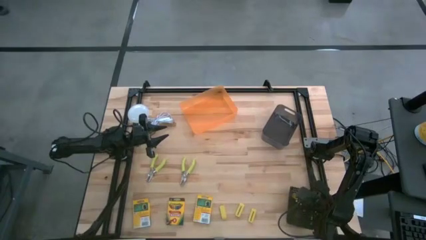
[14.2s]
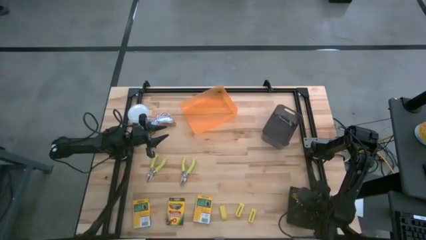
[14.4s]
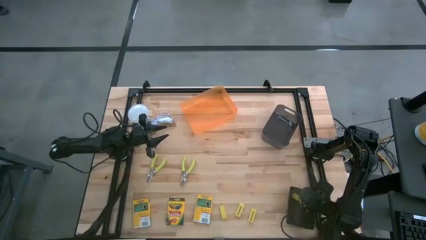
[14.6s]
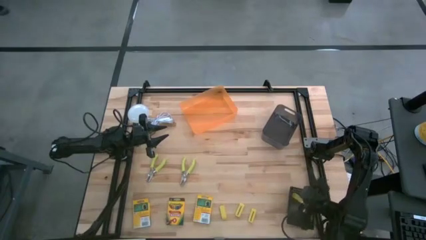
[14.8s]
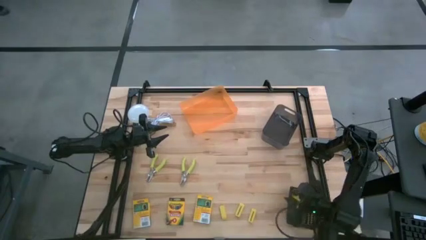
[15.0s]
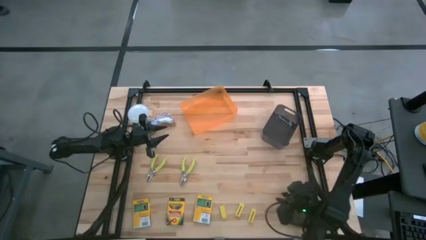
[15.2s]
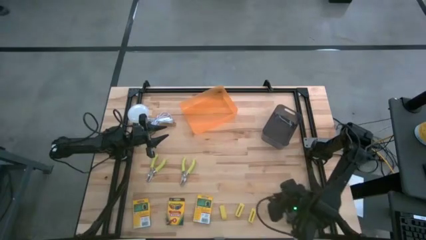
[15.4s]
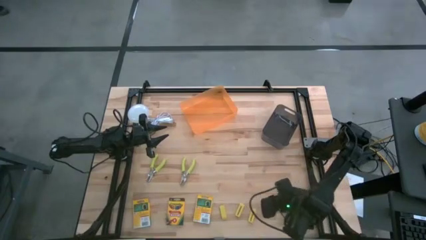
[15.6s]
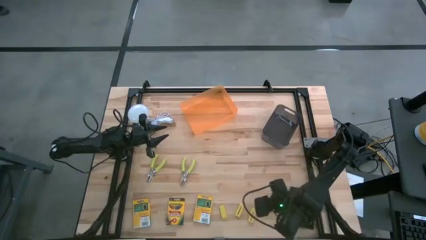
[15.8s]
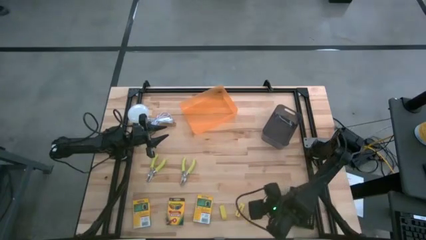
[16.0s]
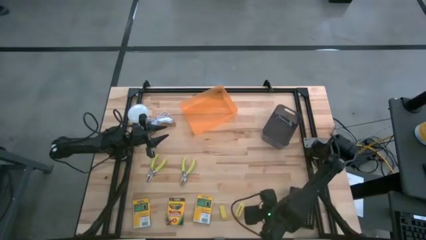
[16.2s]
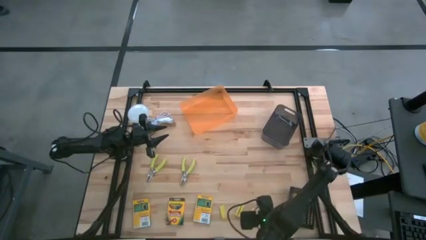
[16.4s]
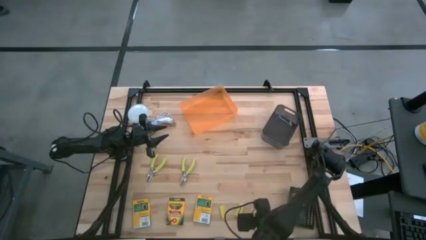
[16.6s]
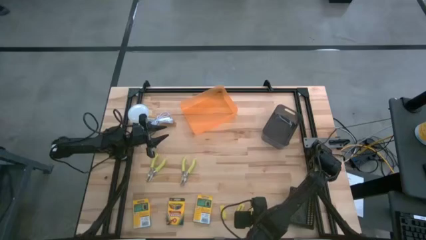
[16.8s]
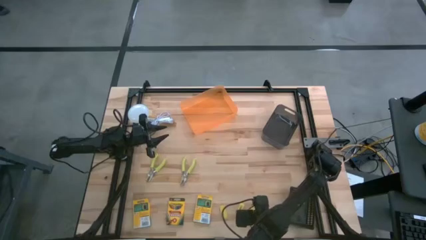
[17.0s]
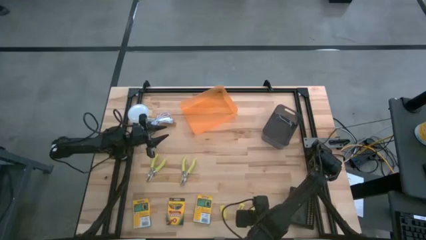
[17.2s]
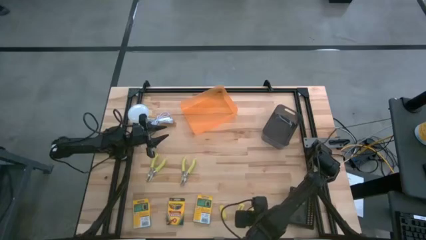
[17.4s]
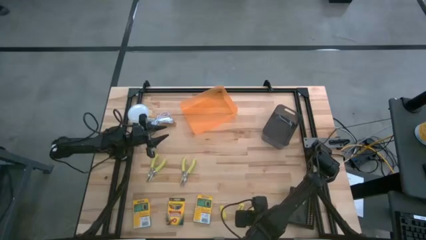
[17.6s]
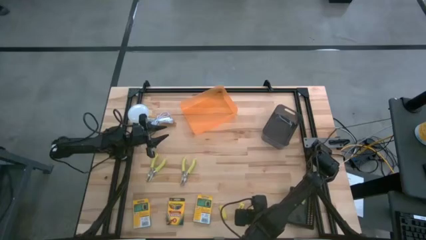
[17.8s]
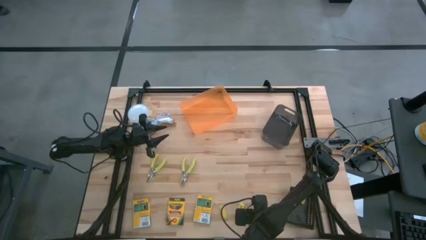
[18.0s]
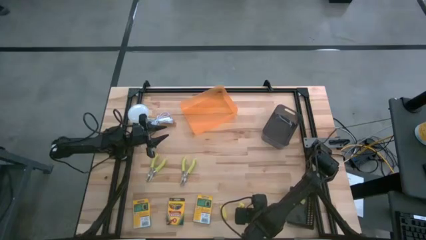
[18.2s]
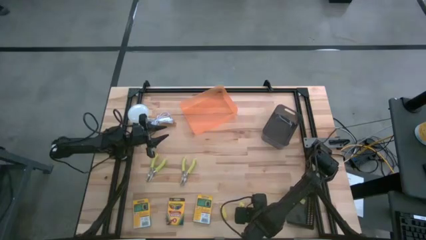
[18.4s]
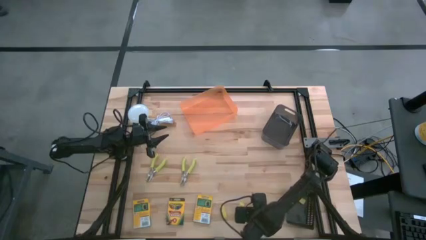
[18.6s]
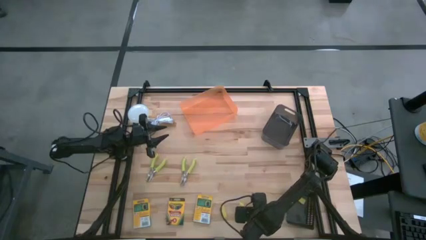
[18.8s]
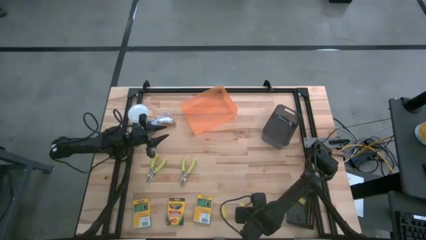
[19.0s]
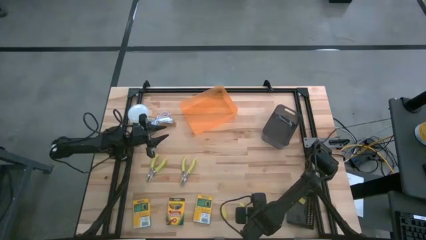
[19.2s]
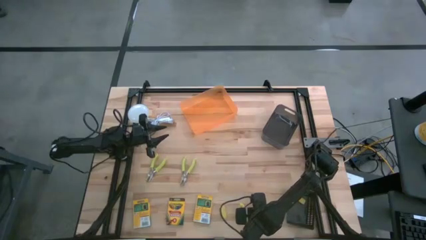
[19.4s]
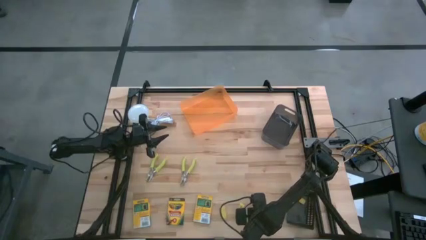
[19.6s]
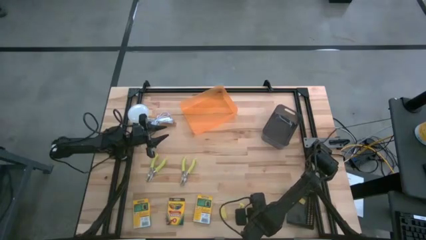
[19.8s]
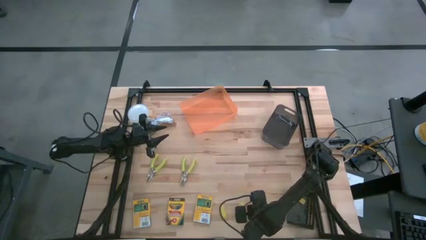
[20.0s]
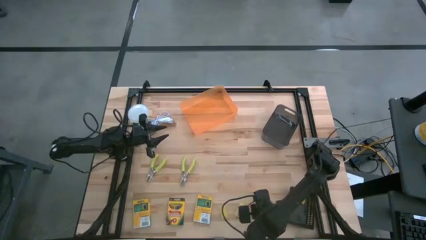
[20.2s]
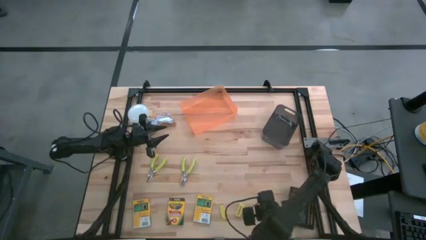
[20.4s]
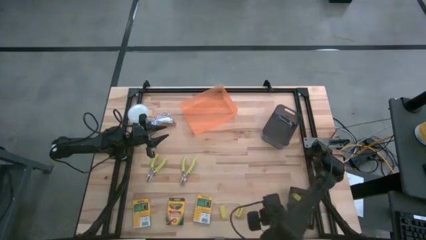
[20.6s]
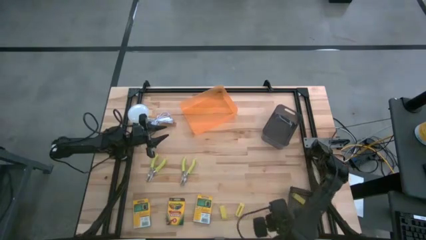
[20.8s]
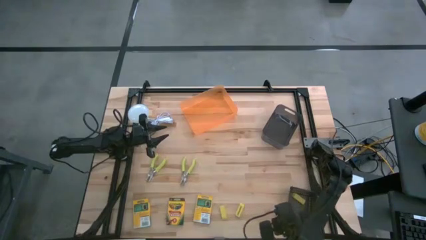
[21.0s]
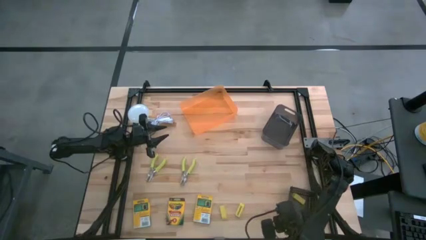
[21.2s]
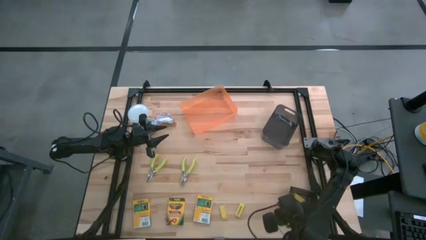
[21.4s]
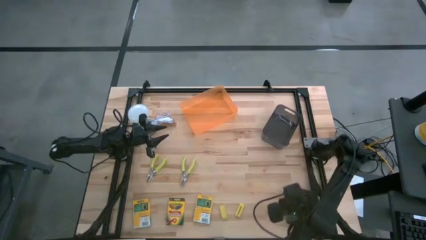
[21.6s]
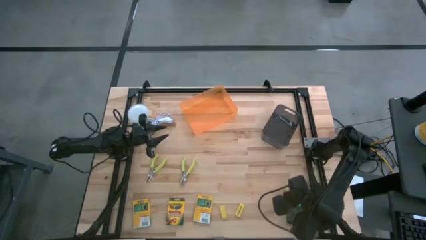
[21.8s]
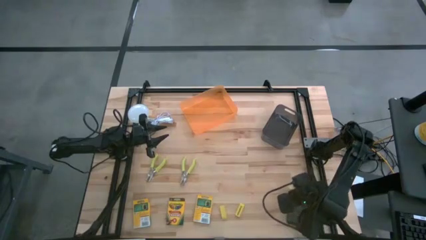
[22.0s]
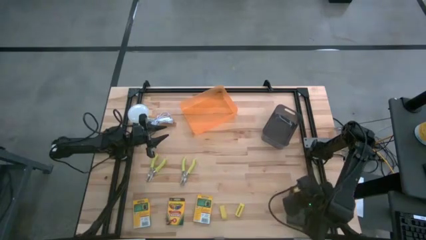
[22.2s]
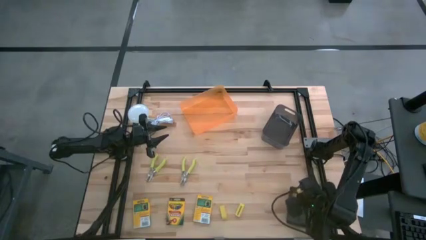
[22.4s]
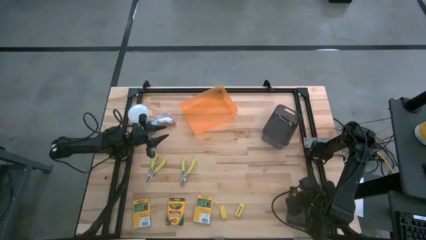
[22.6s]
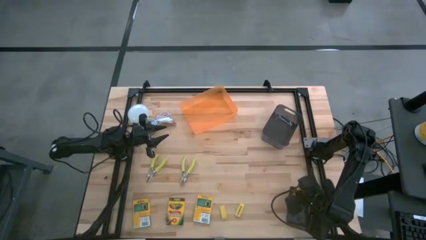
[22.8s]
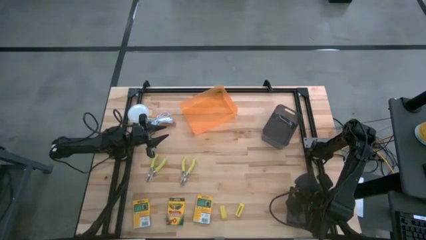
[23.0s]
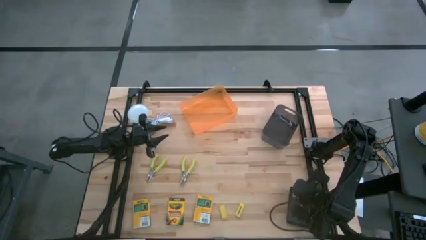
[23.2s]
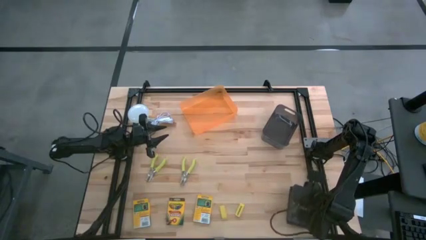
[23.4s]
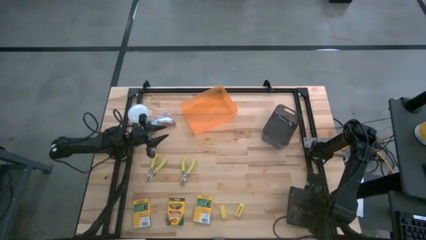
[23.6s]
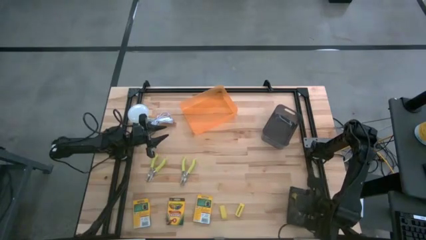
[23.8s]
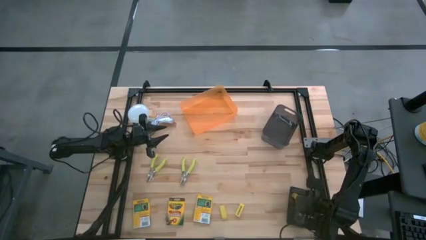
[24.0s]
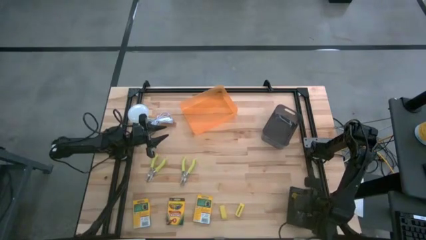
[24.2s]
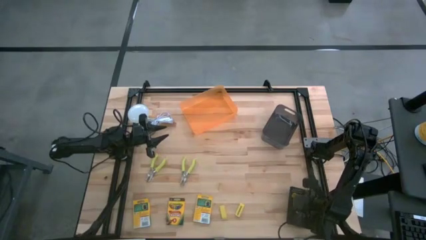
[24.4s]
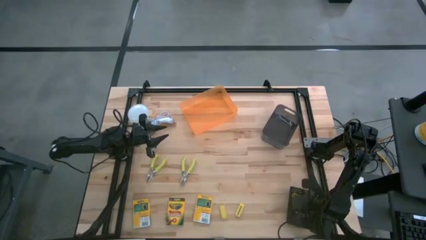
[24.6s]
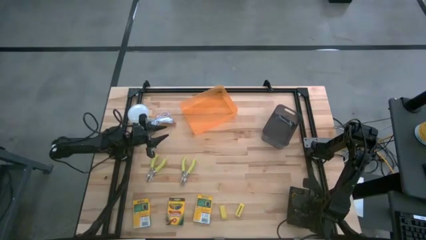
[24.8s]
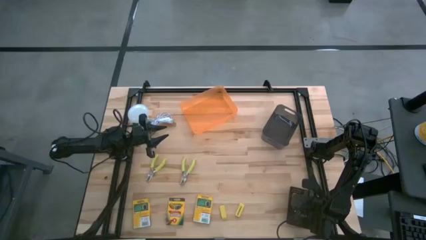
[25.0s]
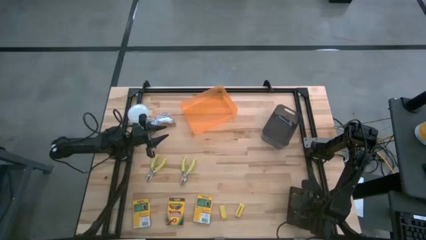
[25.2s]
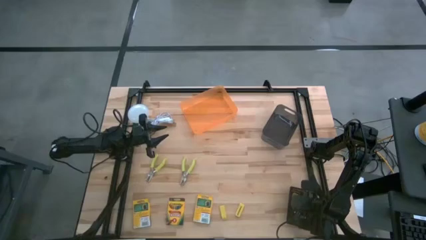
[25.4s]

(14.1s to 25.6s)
Task: Pick & Place School Supplies
Put the yellow eraser into the black basket

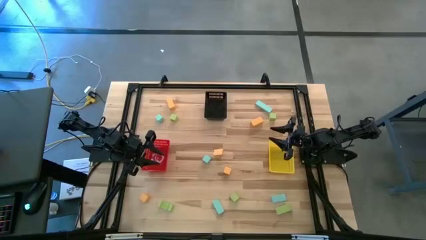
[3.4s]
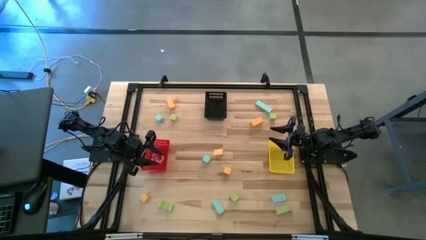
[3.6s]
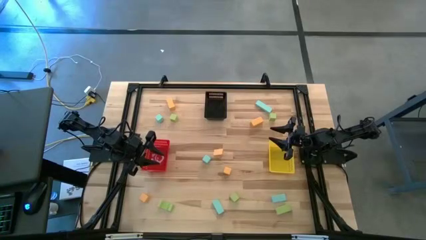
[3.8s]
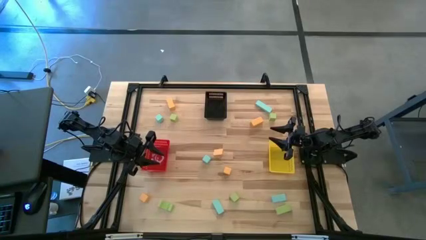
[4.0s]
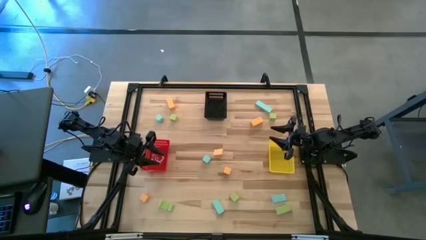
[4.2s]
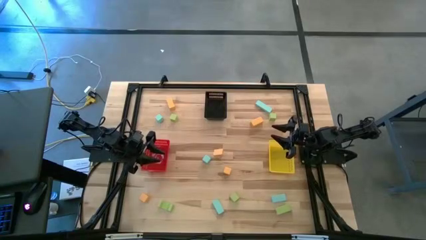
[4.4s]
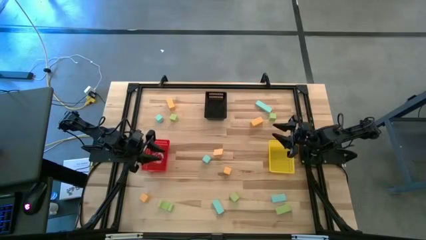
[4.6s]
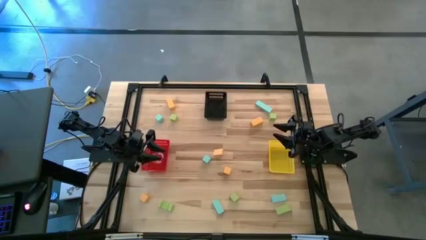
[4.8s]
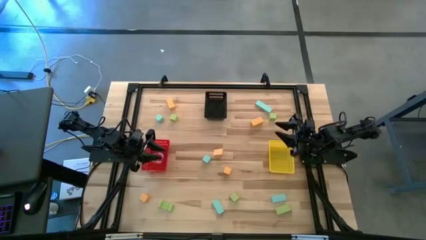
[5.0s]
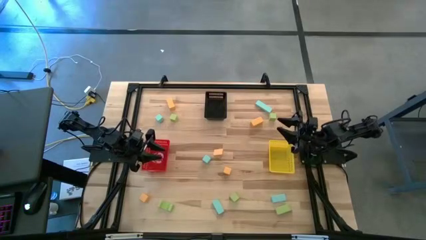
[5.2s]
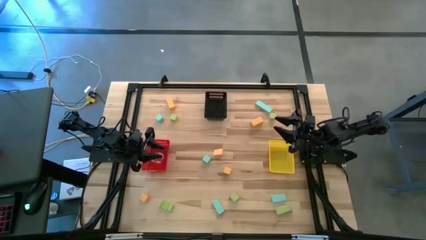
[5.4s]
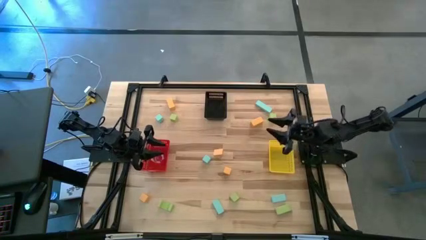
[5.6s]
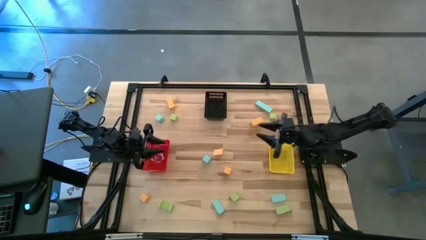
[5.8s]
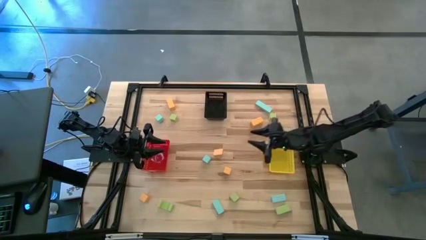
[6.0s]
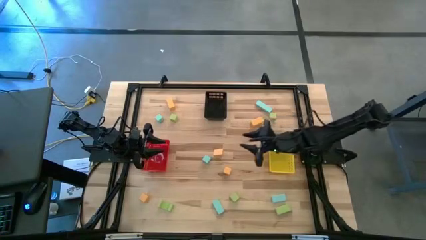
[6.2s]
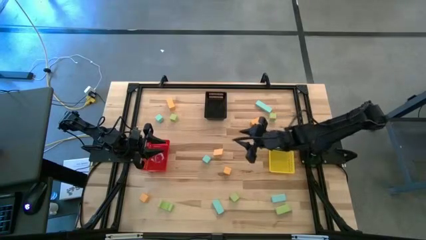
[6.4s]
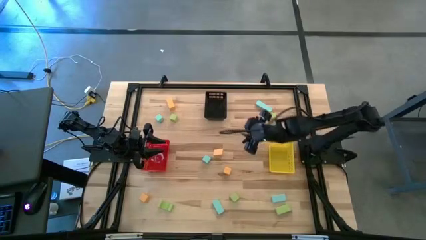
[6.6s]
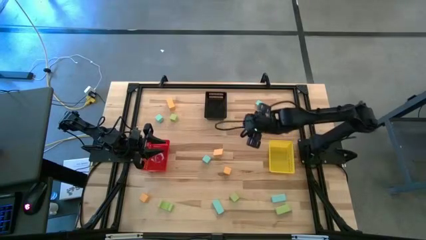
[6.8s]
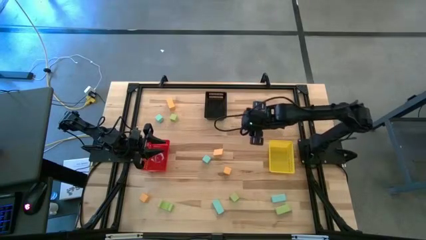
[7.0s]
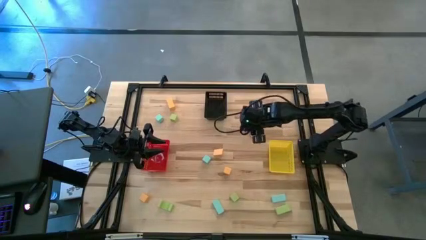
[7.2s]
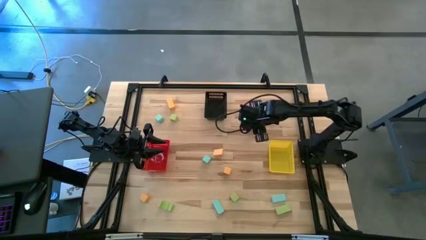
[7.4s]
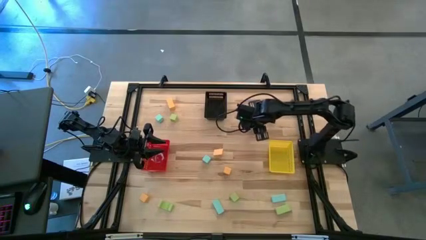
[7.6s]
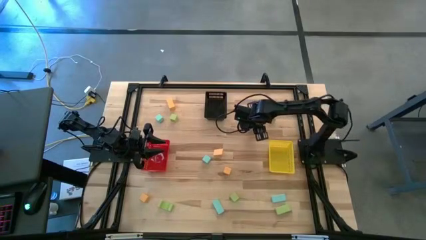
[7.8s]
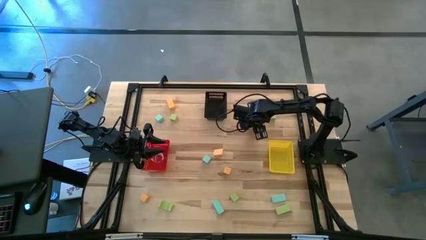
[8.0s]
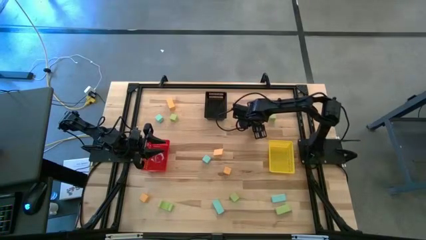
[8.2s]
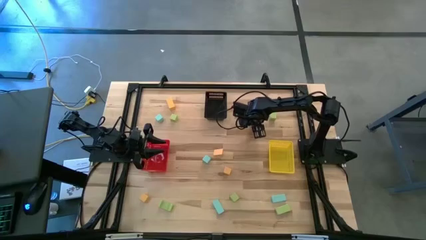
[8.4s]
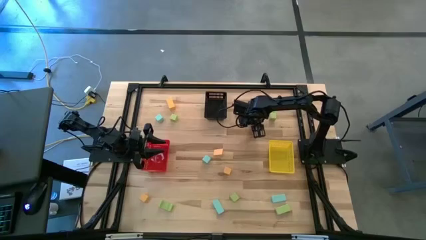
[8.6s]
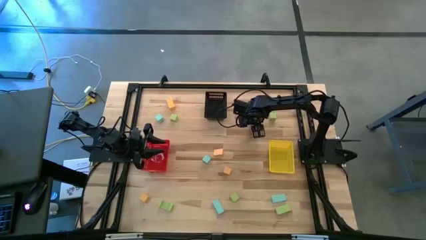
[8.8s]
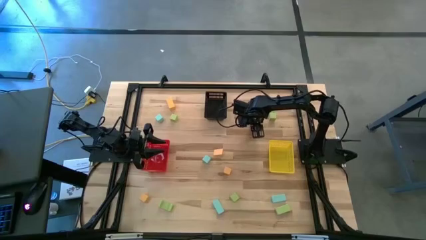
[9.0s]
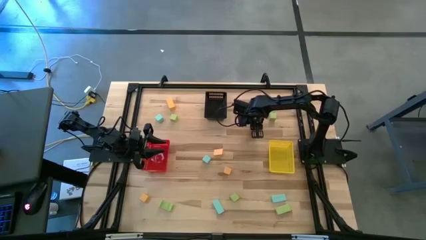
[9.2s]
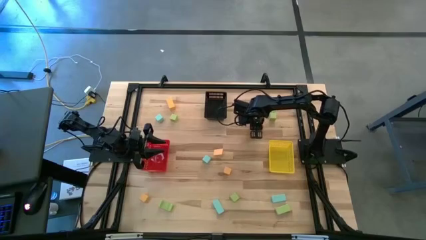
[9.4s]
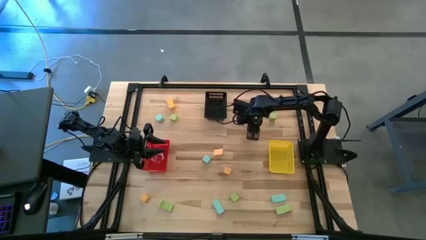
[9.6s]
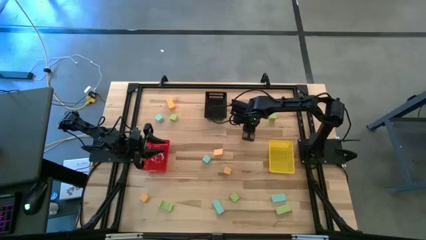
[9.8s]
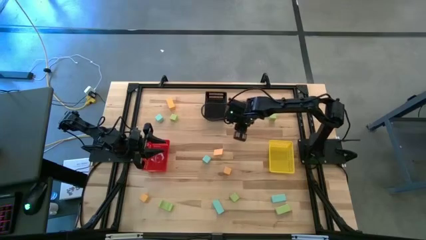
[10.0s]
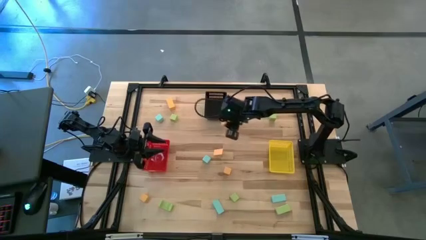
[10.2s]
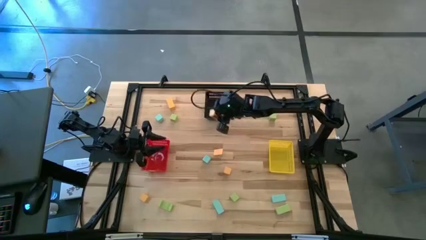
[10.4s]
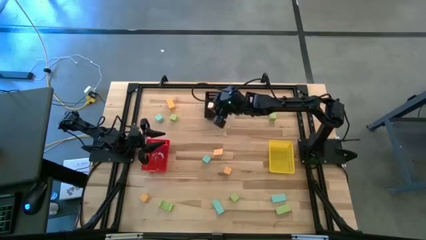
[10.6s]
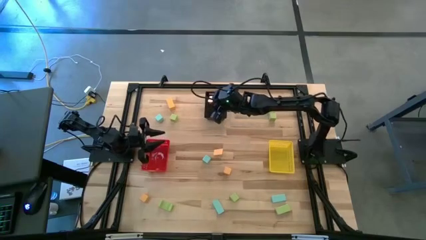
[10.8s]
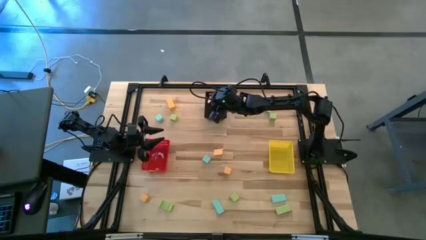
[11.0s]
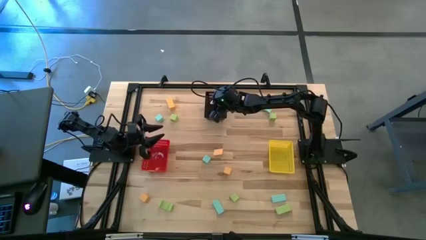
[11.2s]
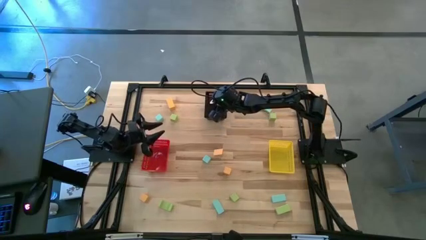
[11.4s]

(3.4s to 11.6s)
Task: Sort & place blocks by color
Put the yellow block into the black bin
